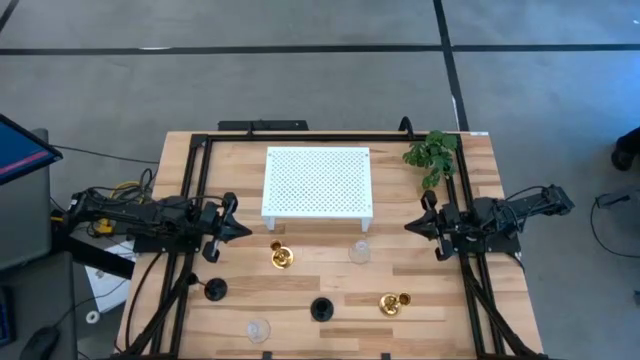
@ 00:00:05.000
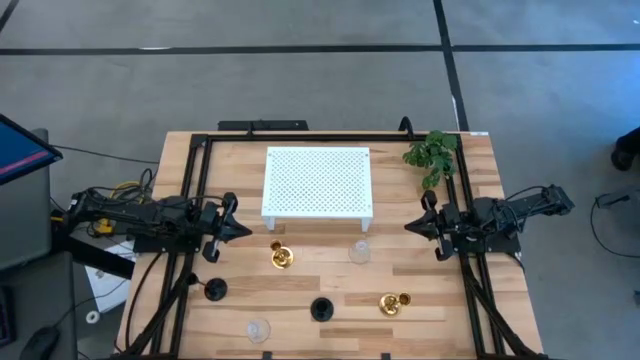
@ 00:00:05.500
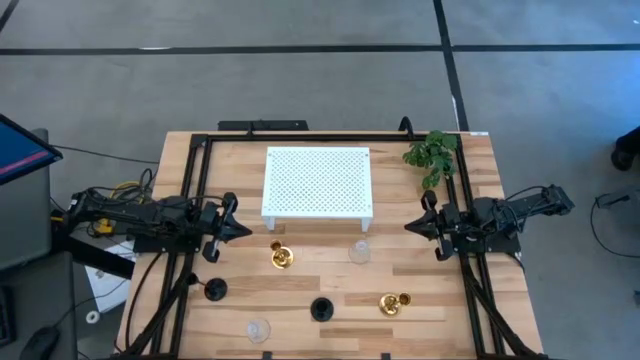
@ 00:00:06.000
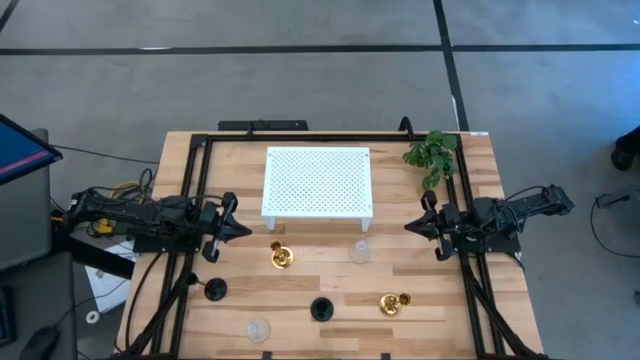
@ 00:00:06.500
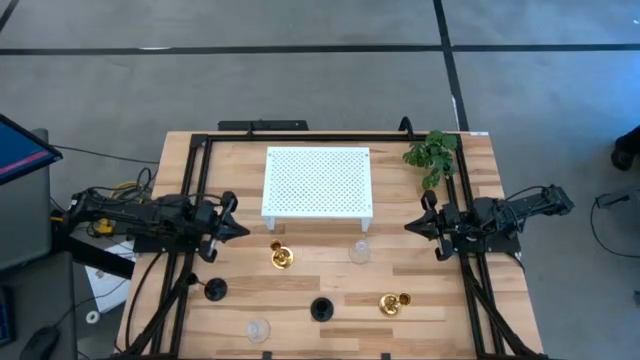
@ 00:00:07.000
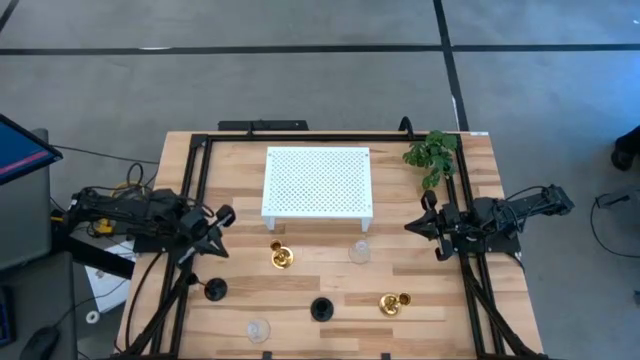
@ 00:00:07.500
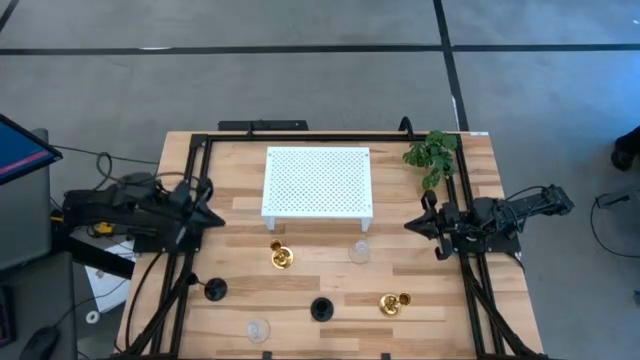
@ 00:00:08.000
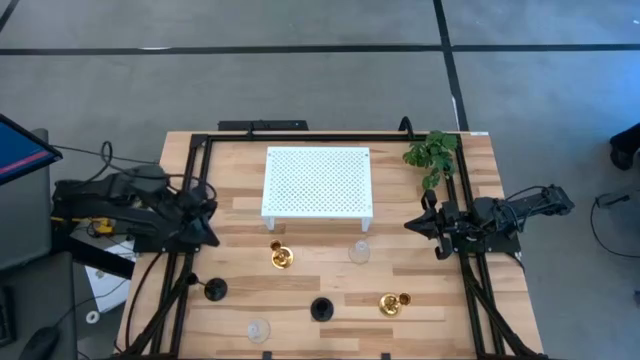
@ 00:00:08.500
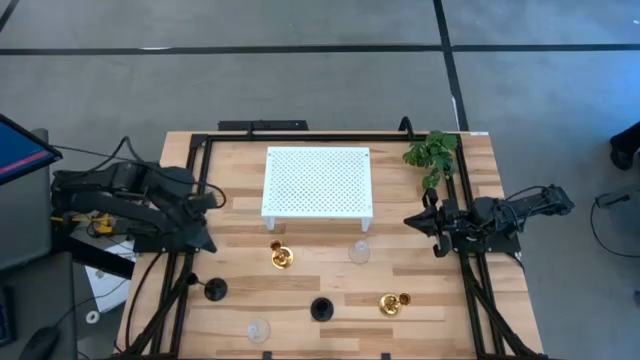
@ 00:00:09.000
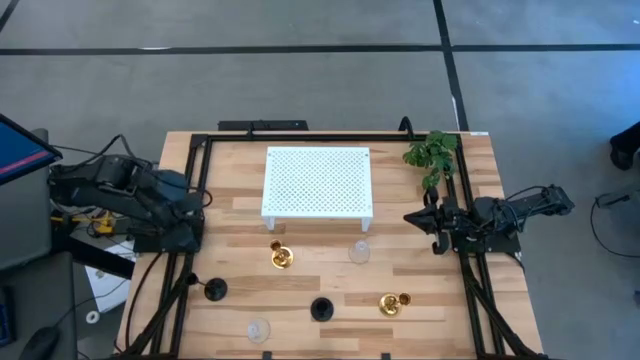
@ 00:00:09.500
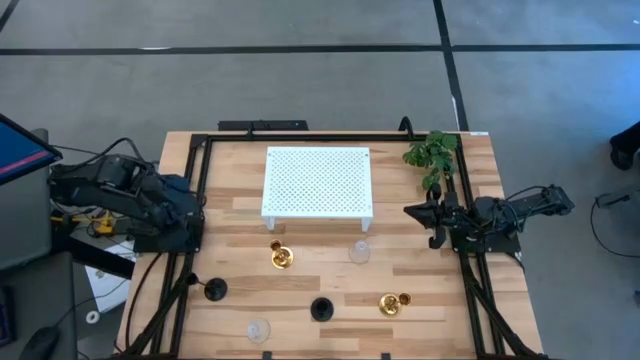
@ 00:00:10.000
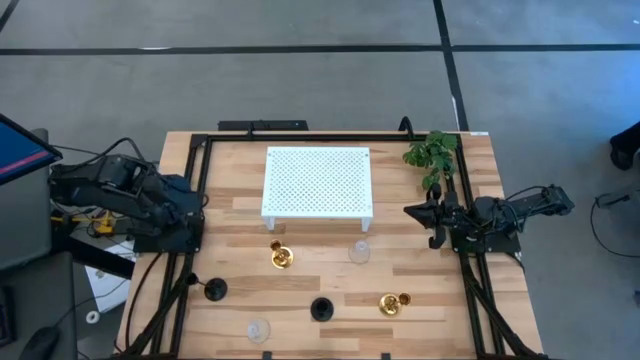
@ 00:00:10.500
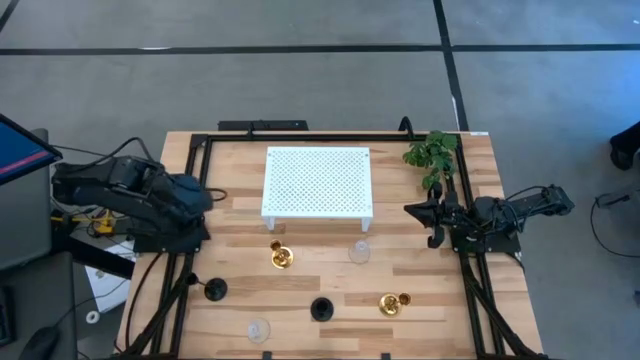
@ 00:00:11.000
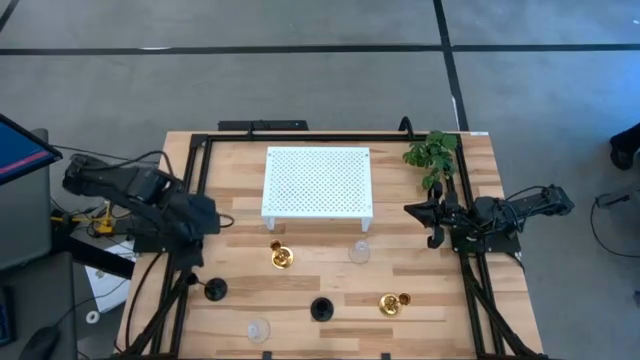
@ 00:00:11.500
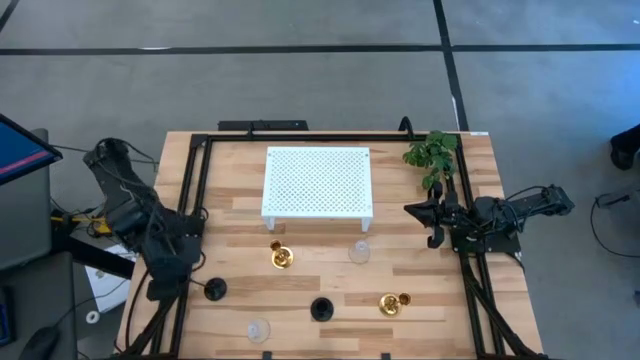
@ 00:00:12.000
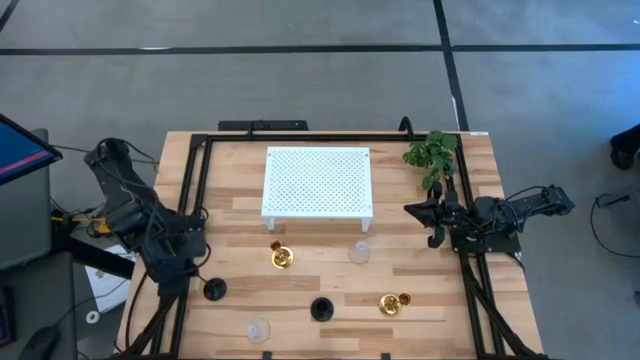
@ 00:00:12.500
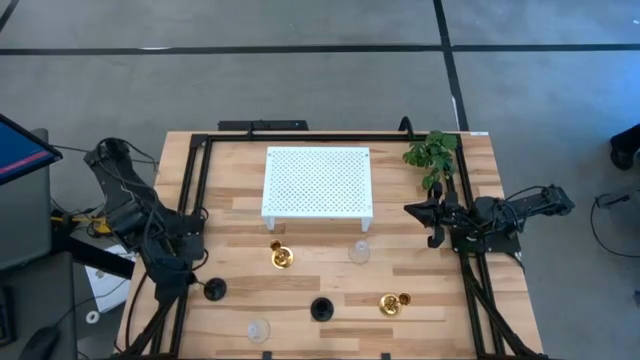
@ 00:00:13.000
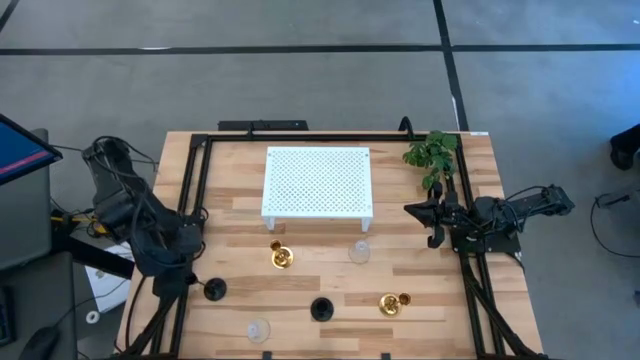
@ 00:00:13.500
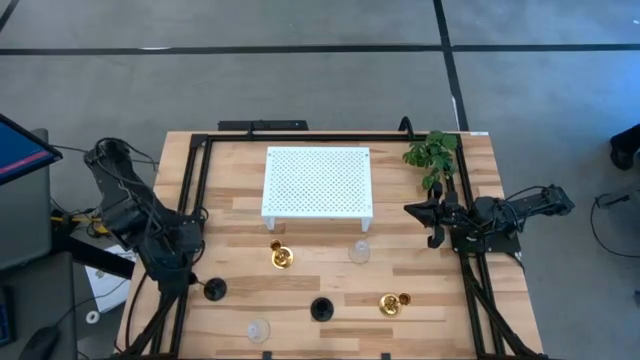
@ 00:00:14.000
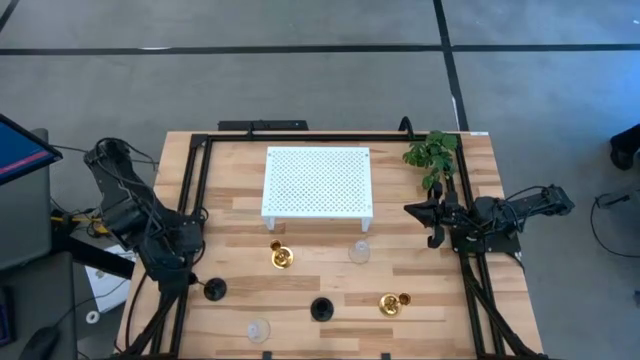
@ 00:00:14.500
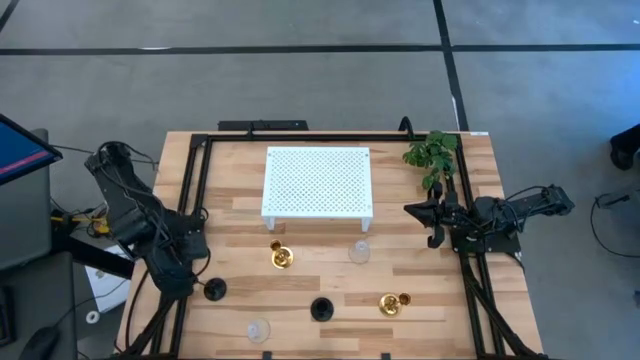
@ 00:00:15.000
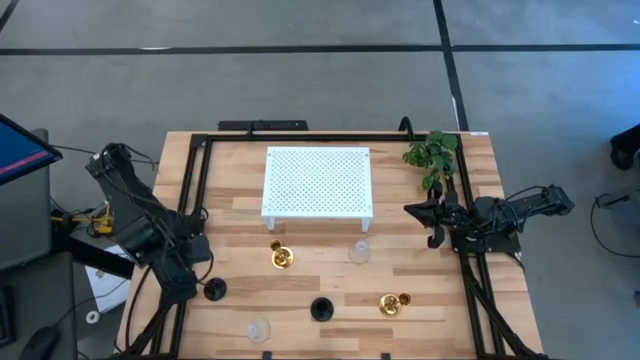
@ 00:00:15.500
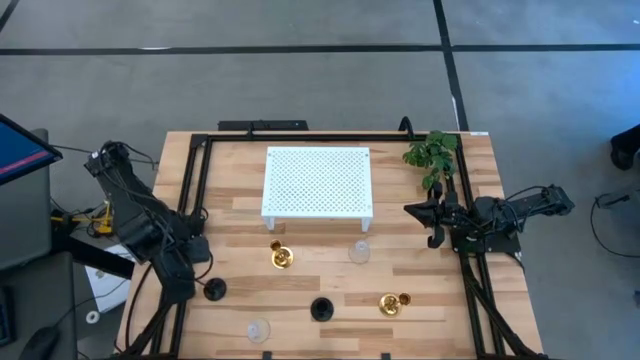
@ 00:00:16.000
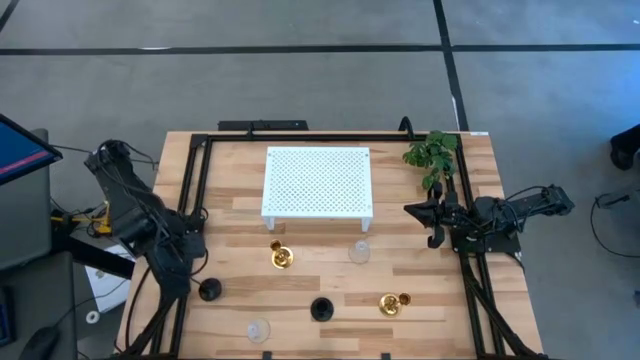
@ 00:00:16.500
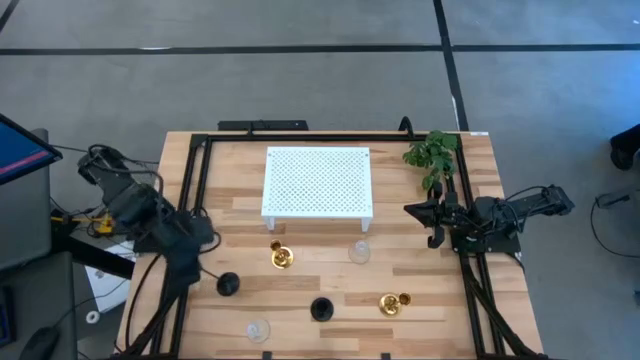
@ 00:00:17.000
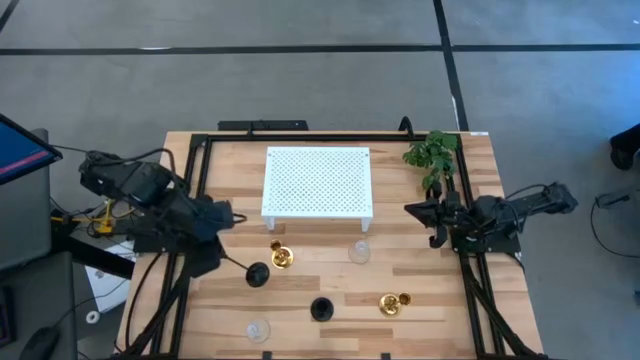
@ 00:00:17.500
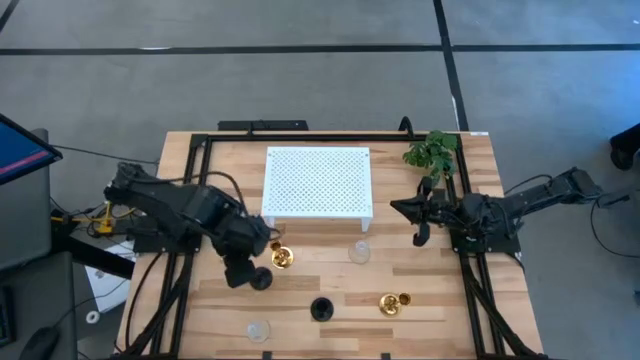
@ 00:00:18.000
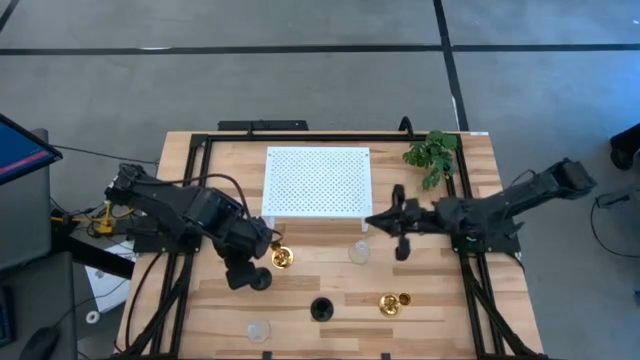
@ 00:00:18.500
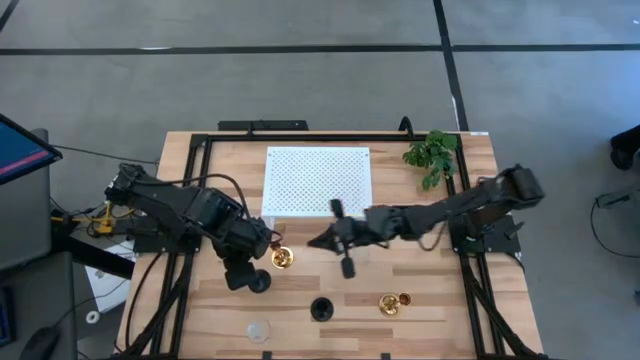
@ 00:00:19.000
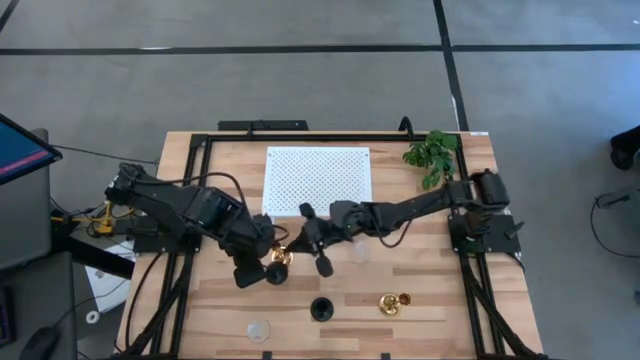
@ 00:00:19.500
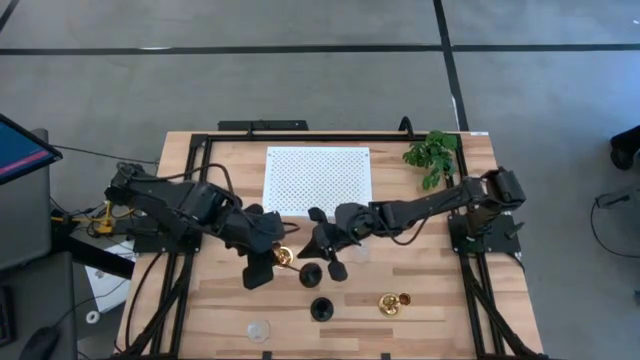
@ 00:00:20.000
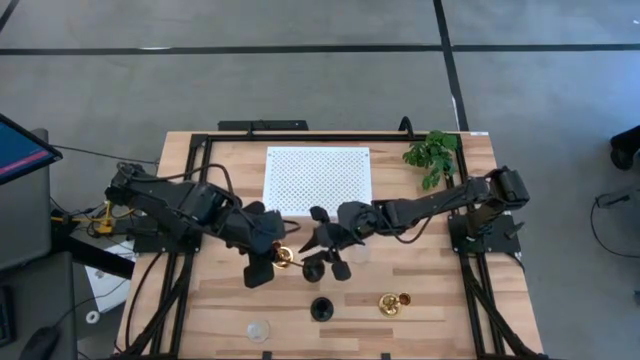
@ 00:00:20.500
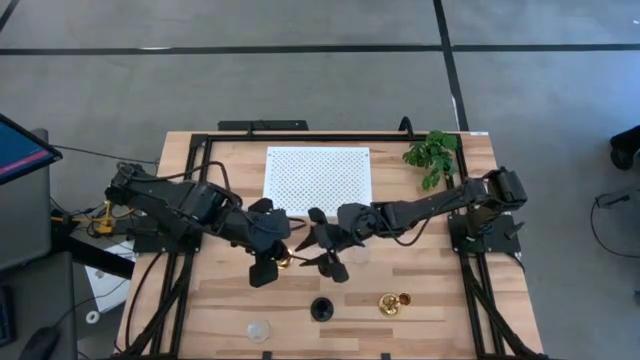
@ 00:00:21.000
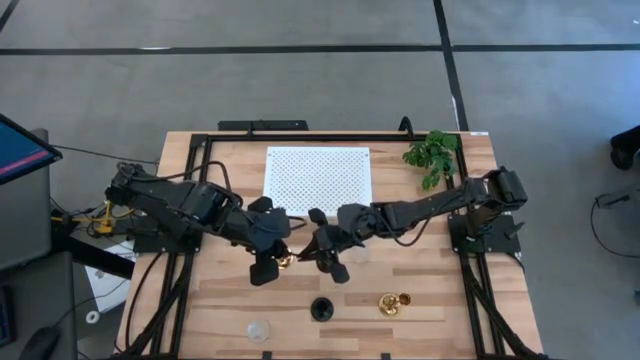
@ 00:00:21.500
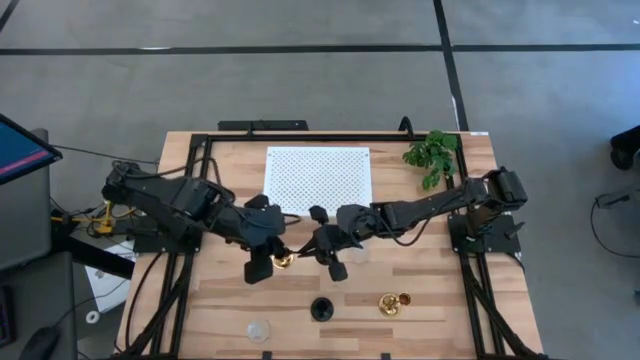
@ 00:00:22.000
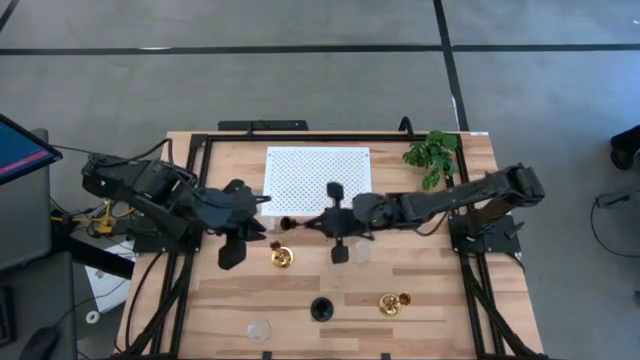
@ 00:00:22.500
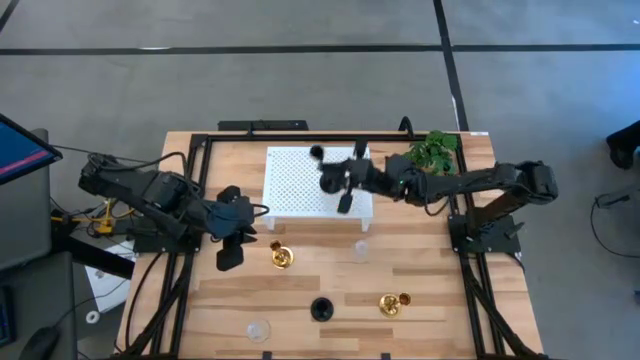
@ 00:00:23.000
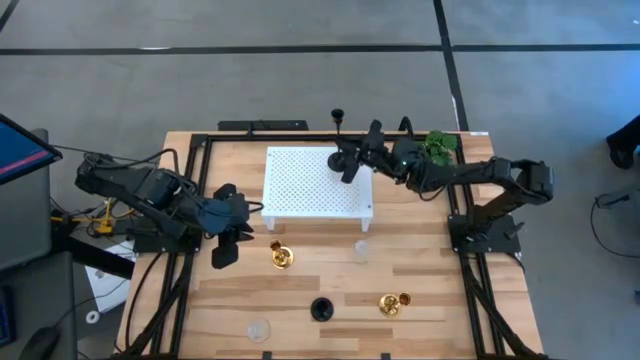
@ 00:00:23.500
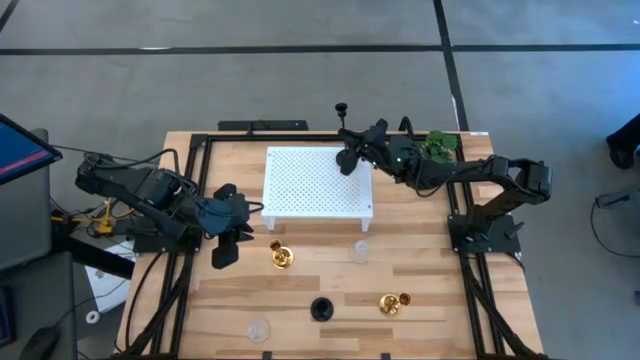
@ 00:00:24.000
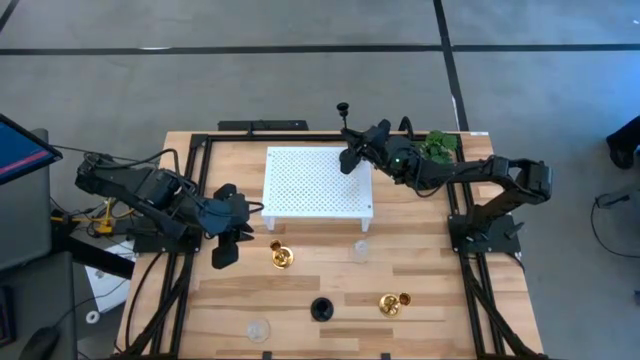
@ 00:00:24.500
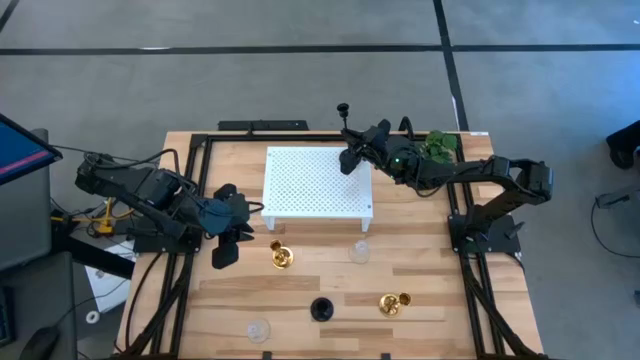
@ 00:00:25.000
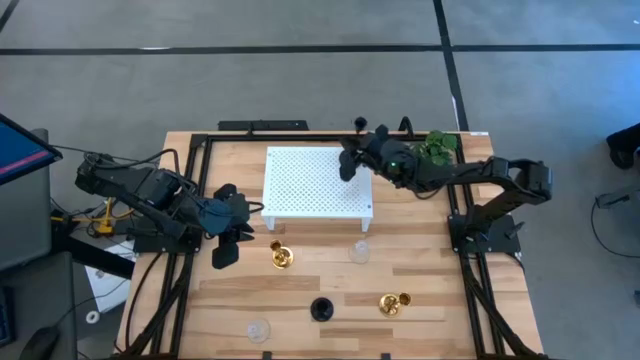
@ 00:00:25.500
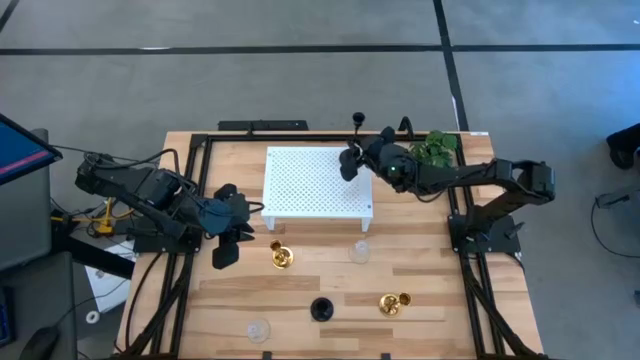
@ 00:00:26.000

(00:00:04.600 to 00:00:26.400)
Task: Pick & Place candle stick holders
Put the left black candle holder on the shelf
